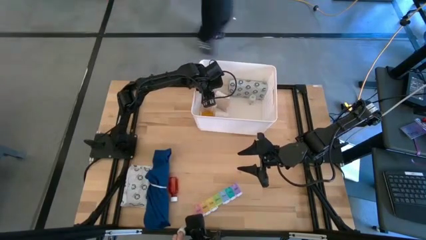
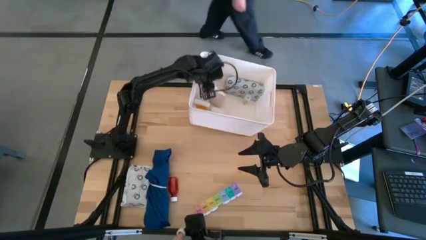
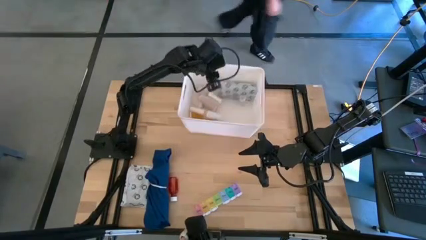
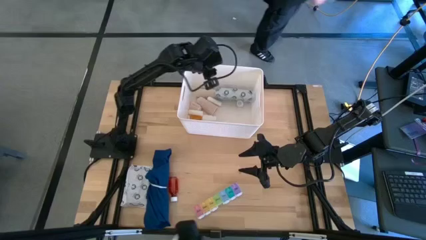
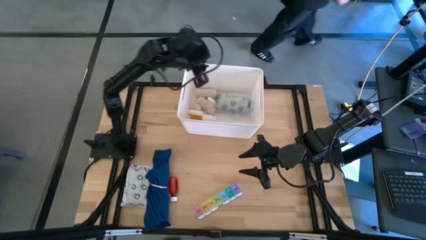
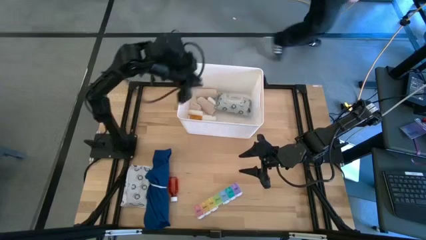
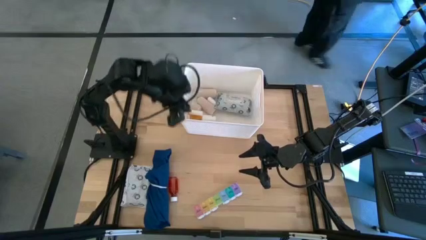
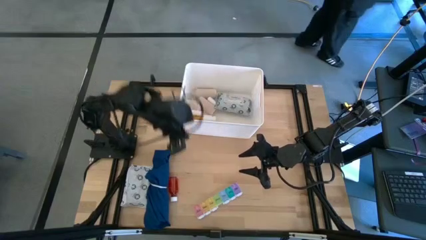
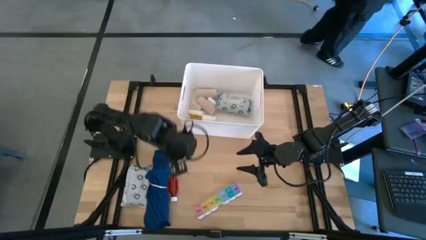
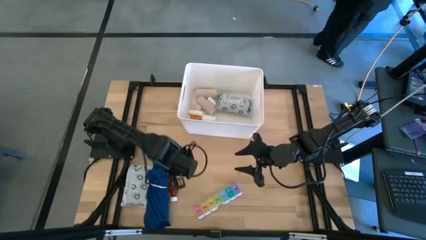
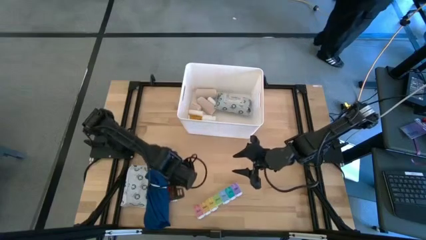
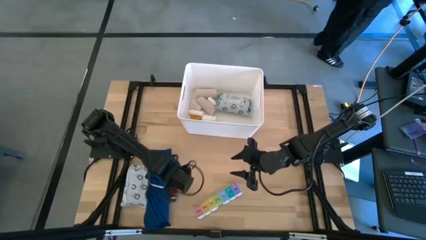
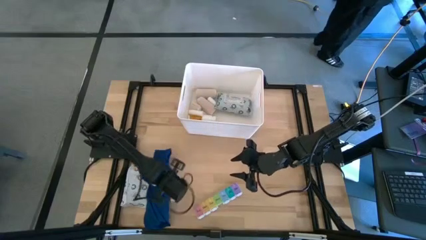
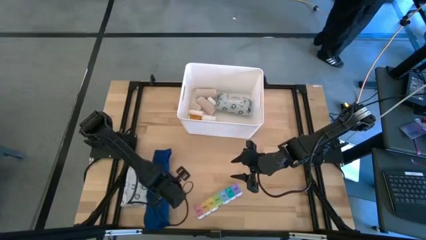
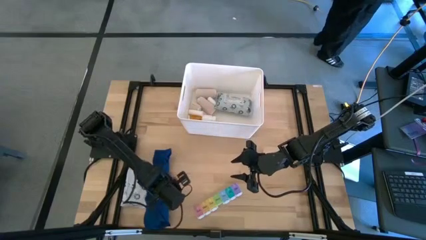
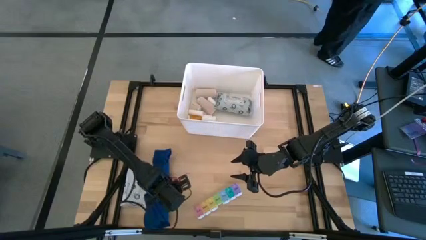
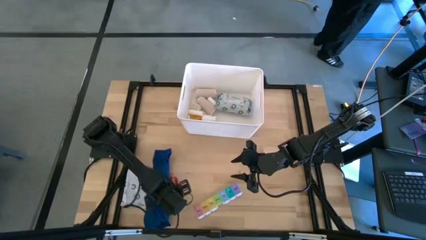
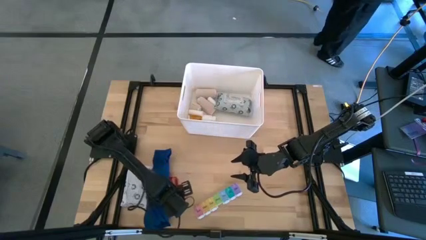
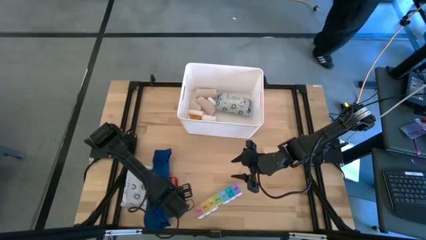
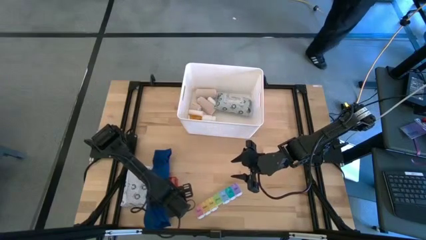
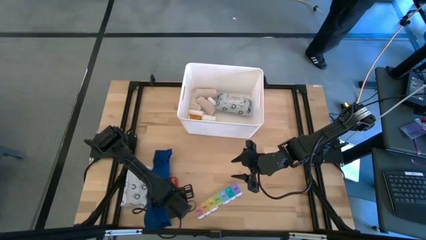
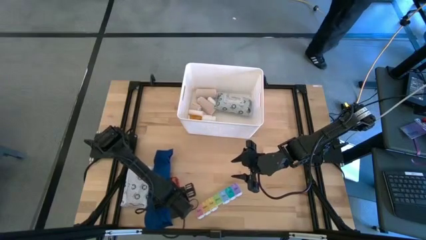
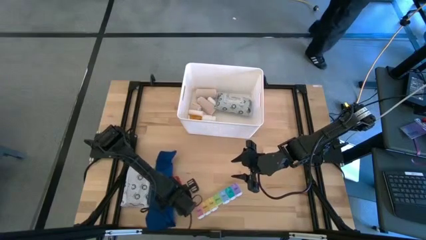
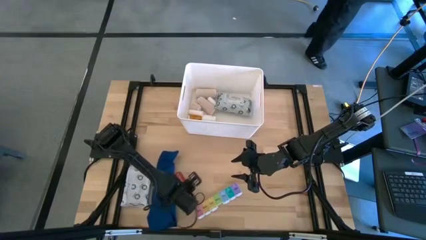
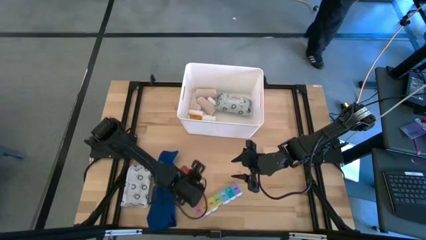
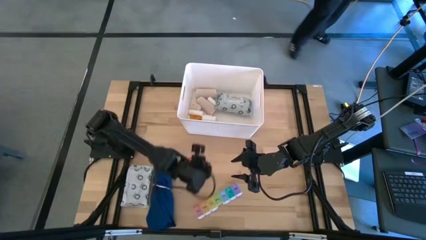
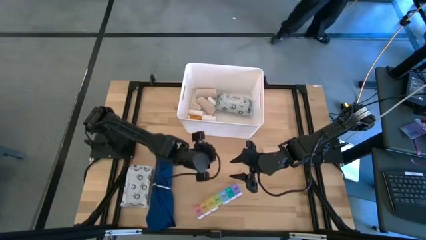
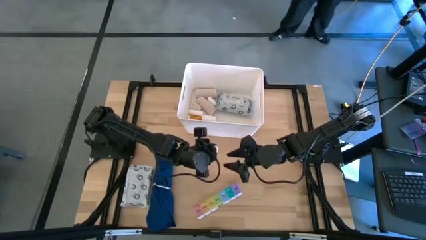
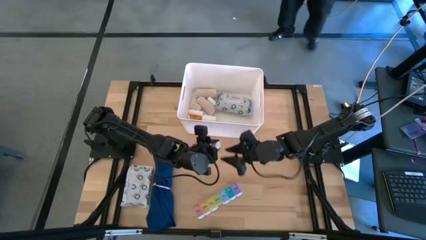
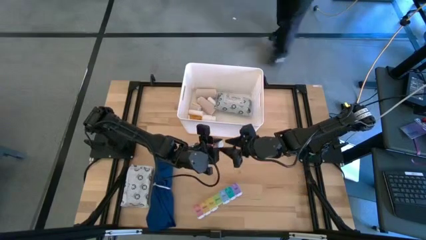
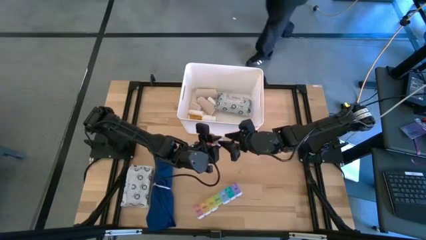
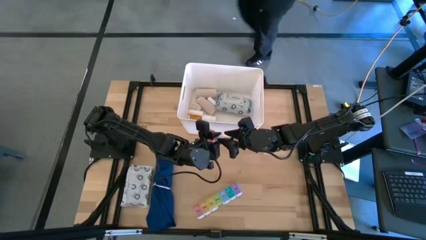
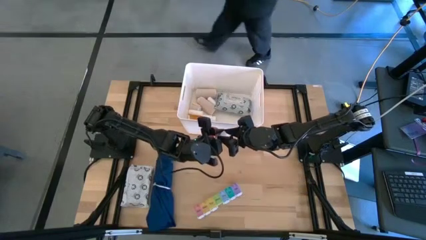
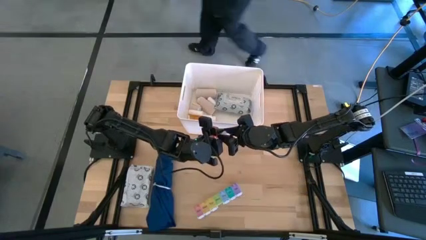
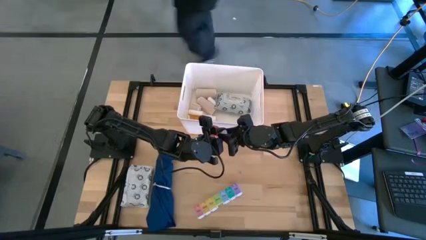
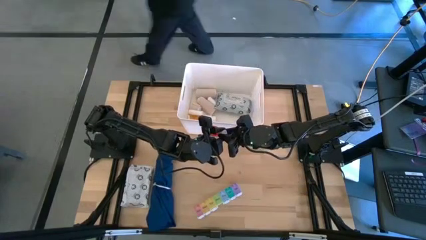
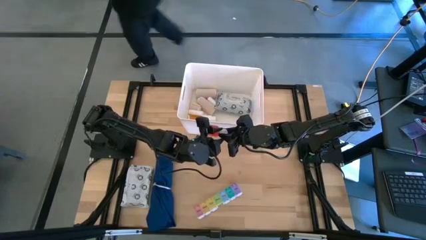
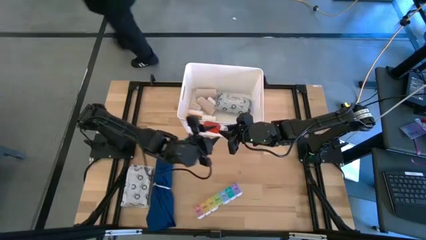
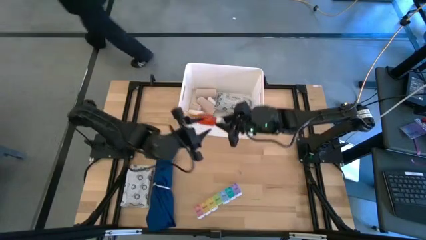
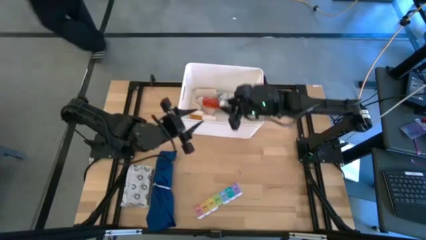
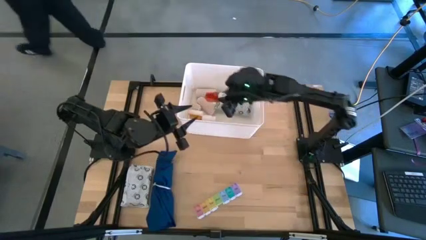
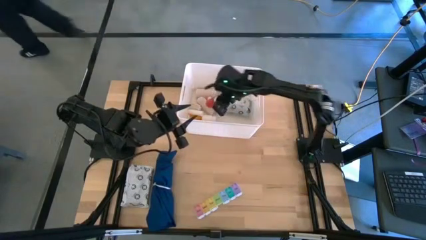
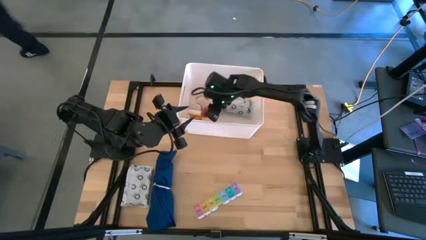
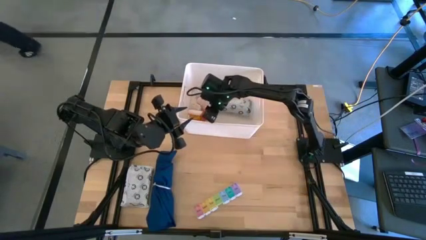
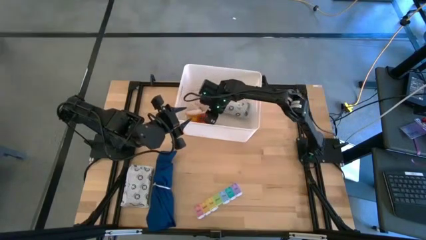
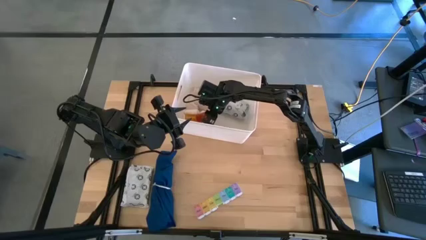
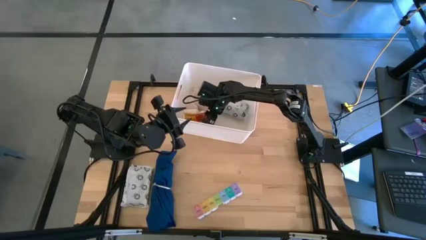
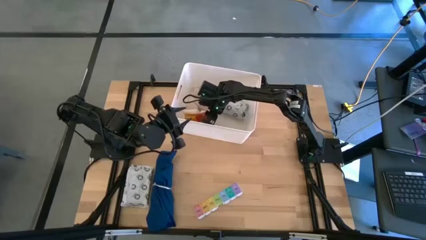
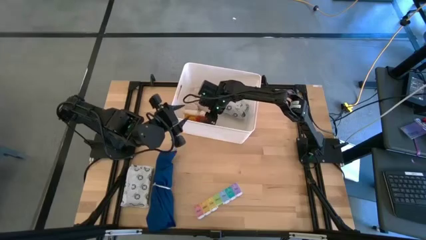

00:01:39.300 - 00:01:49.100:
Task: Pick & place medical supplies in basket/bin
Put the red pill bottle into the white container

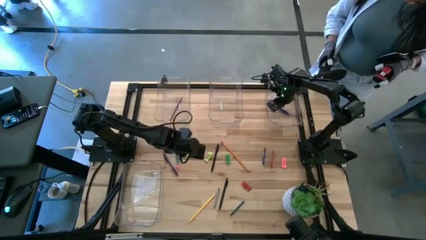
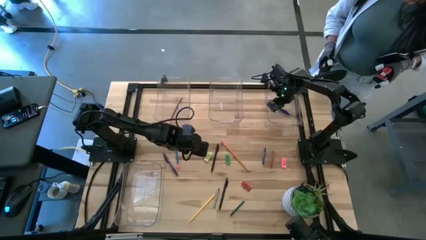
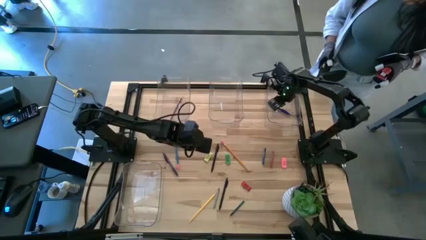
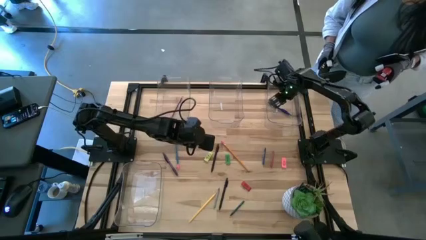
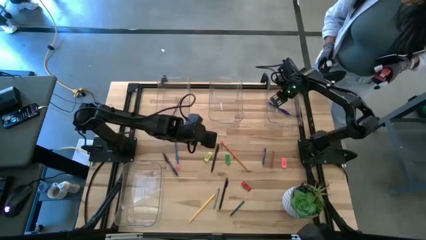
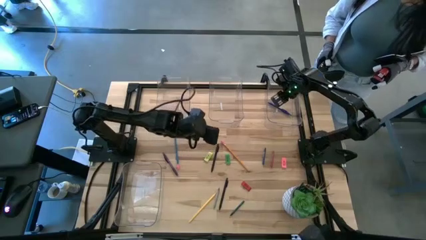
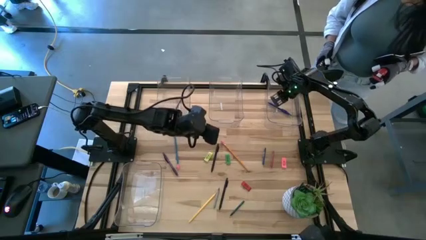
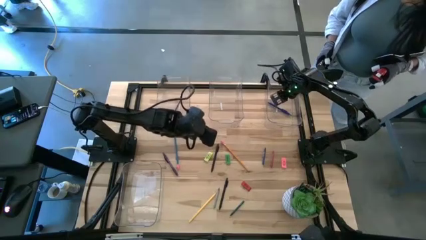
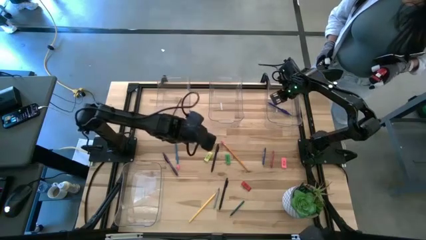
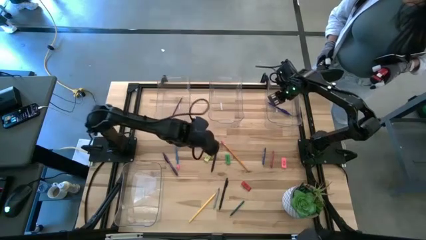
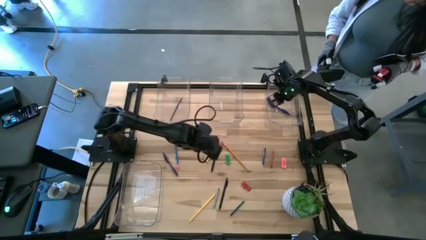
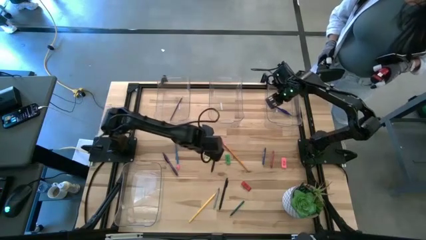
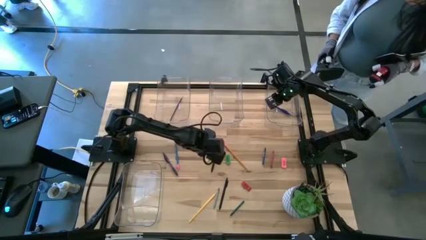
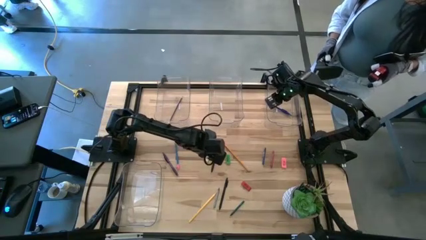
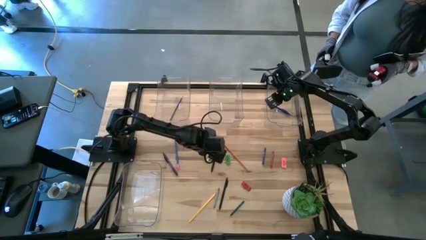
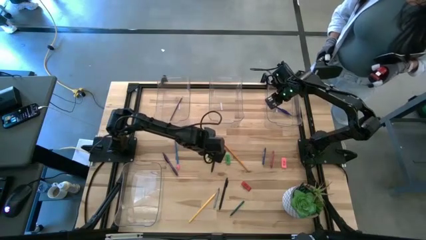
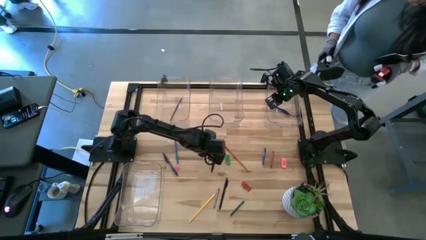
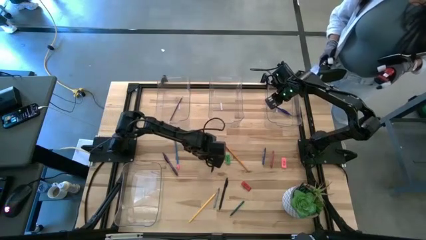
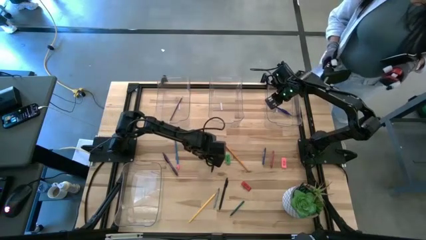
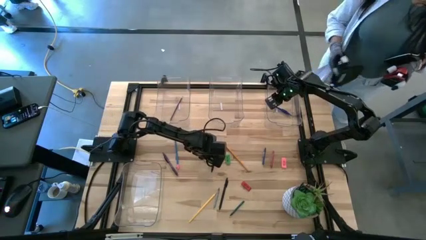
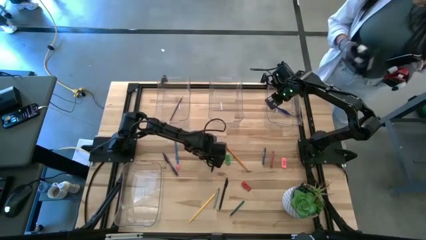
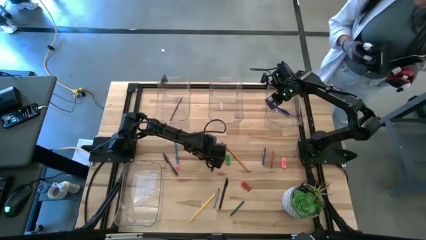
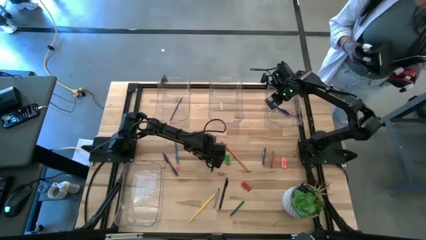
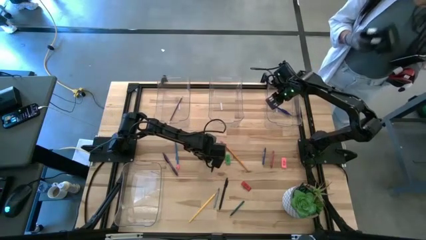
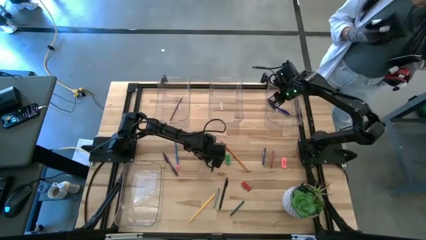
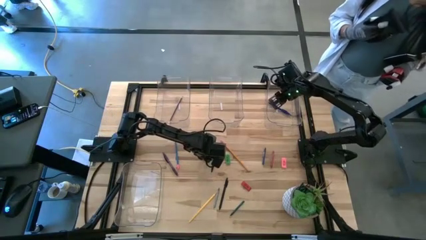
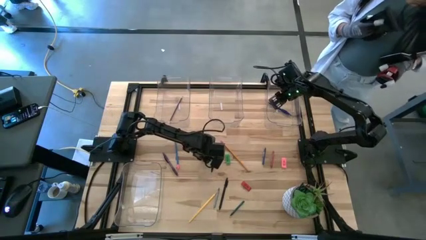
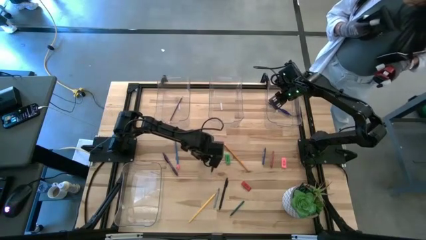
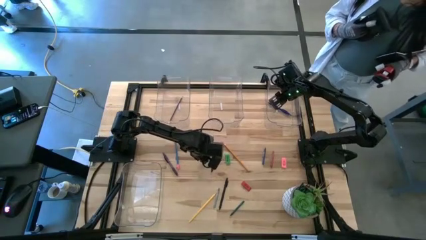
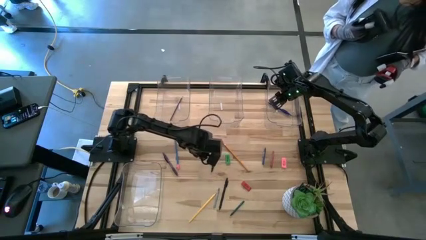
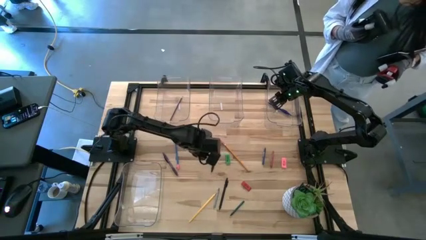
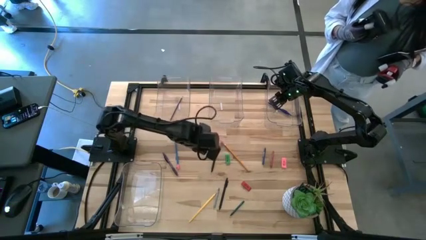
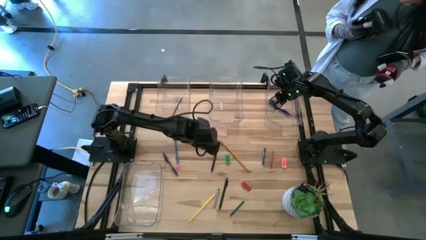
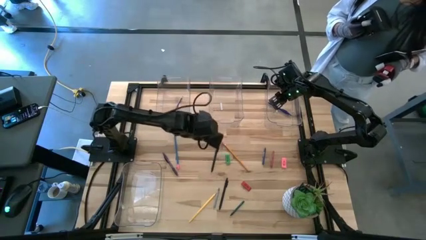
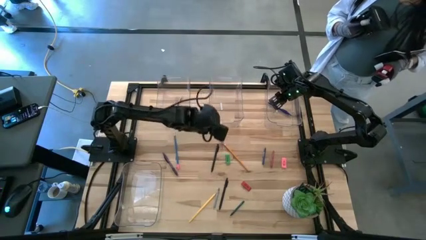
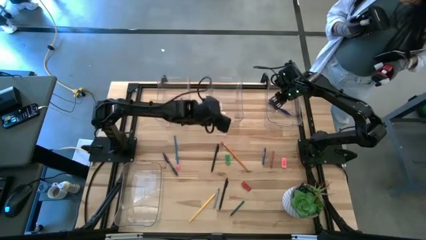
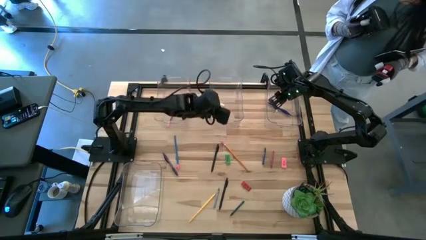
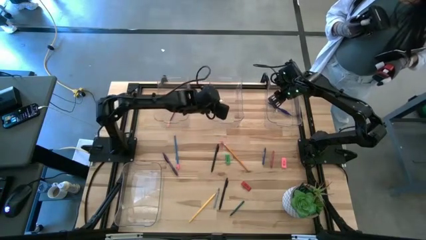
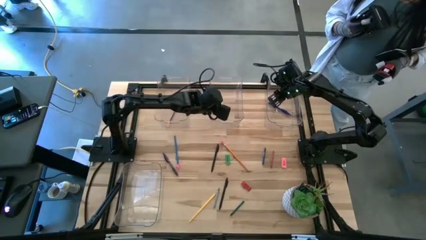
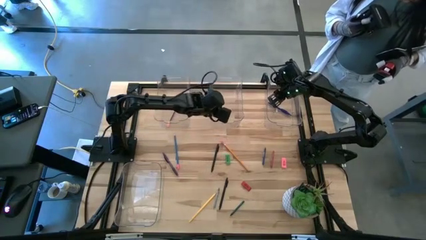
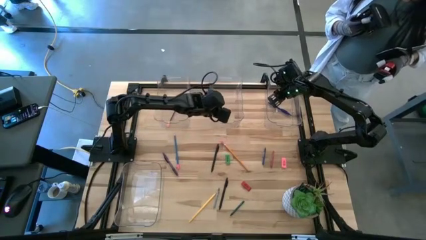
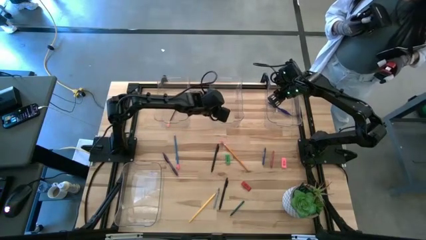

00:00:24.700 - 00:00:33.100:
Task: Sort crayons/erasers/pens/pencils in bins
Put the yellow eraser into the top middle transparent bin
